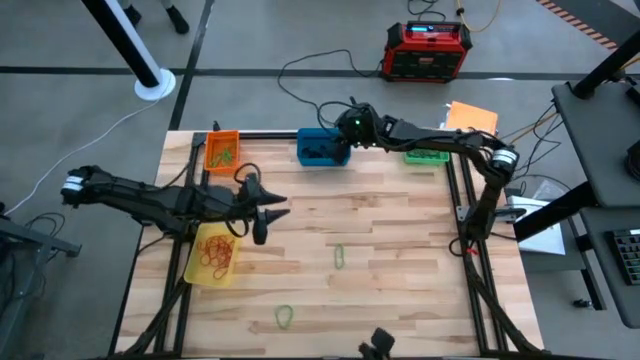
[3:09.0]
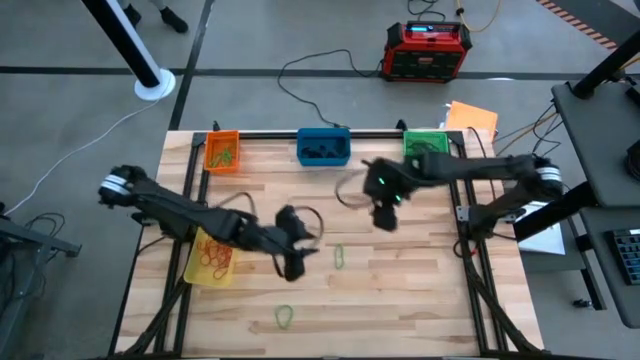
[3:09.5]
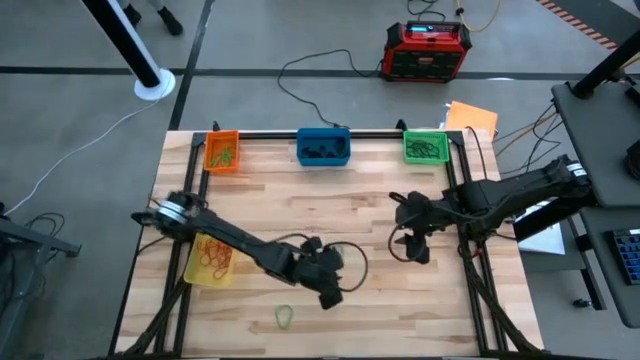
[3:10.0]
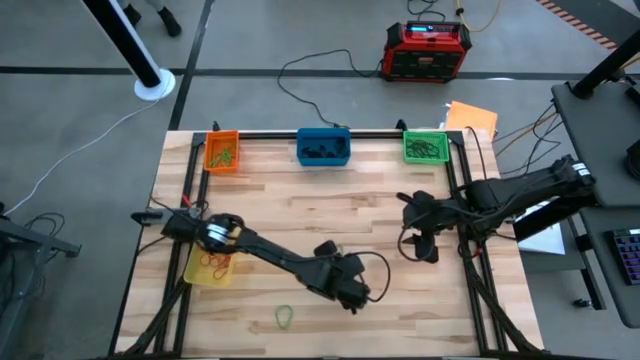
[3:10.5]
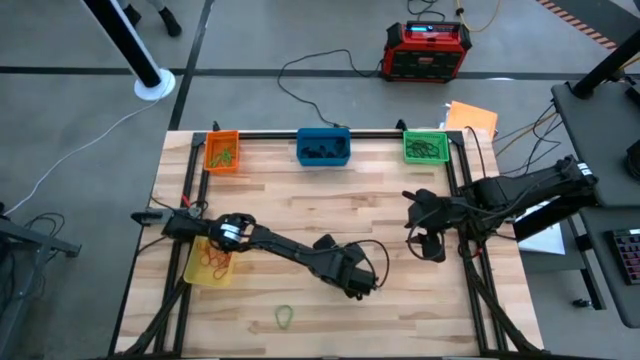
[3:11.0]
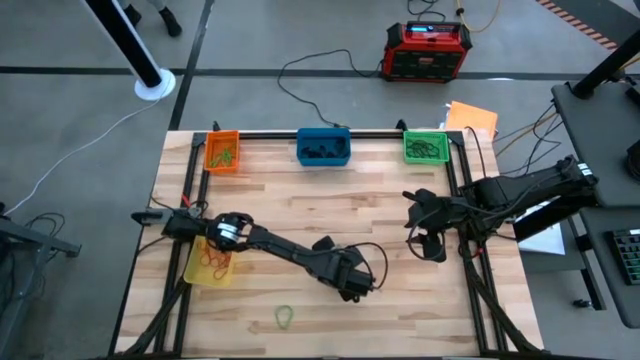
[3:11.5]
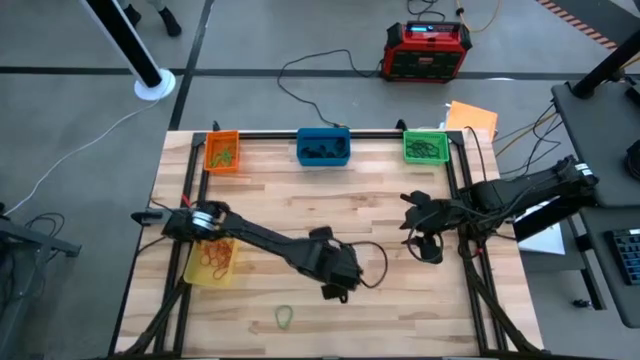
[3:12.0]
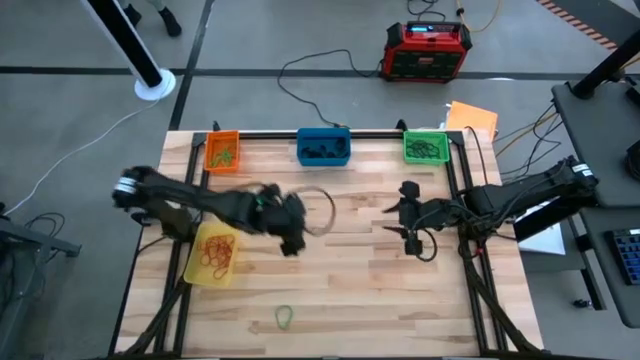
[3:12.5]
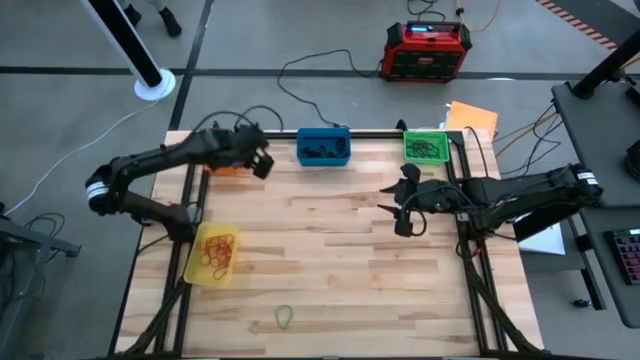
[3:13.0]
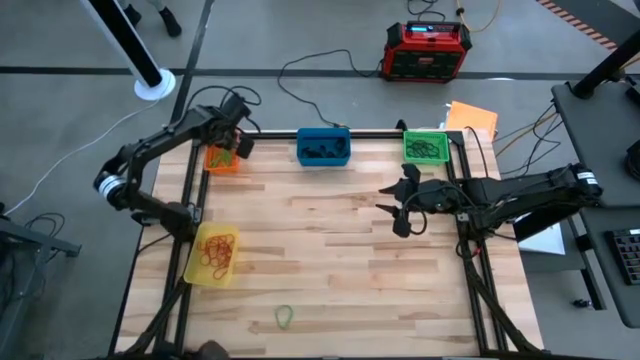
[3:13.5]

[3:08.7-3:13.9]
Task: Sort rubber bands into baskets
Put the right green rubber band into the orange bin

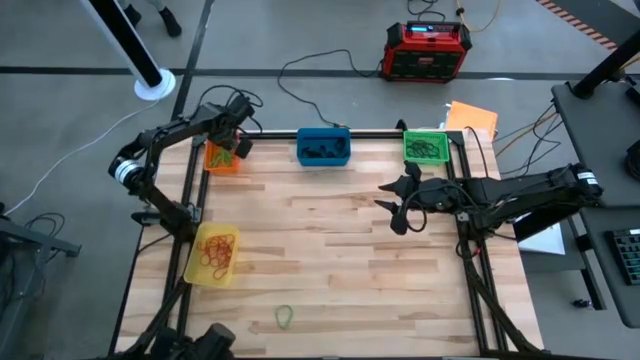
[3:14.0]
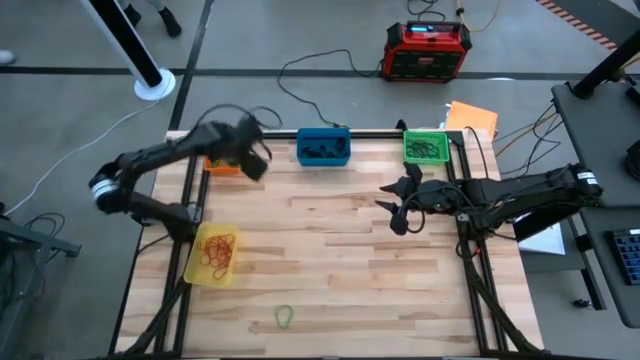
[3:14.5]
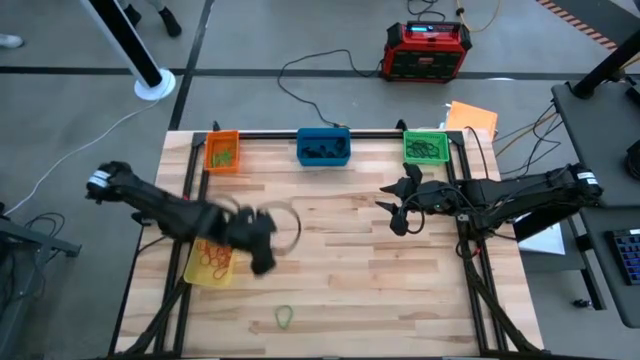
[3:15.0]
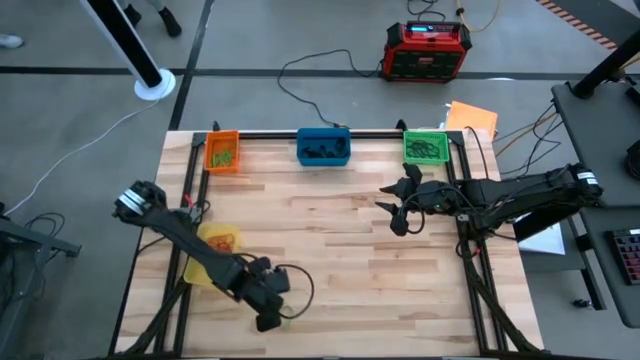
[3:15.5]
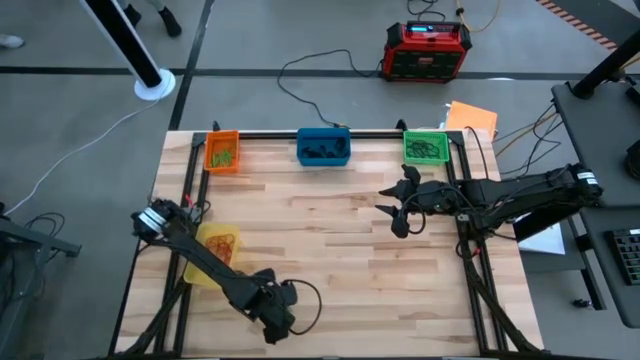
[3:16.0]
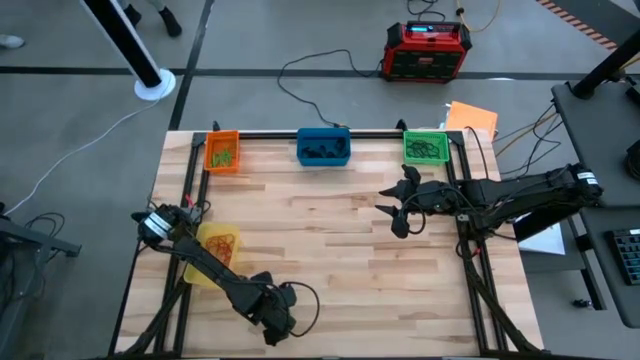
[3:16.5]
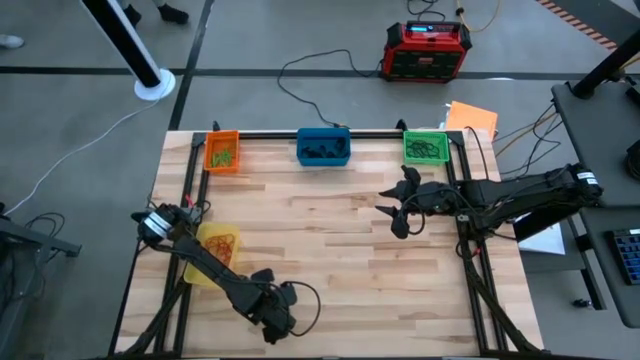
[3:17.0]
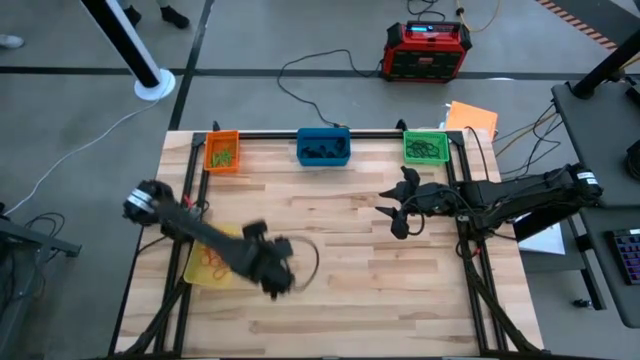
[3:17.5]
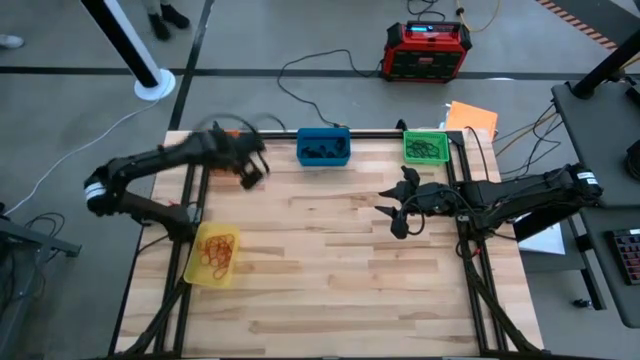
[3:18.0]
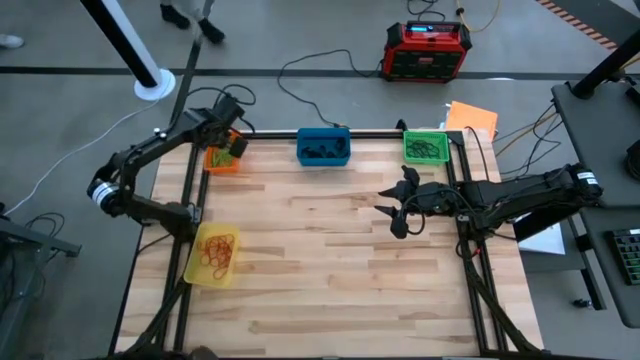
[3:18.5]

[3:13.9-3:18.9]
Put the green rubber band into the orange bin

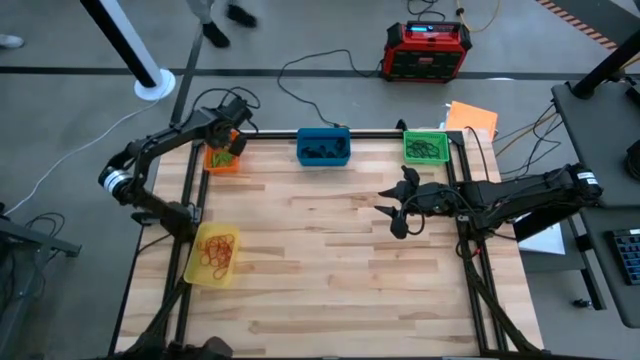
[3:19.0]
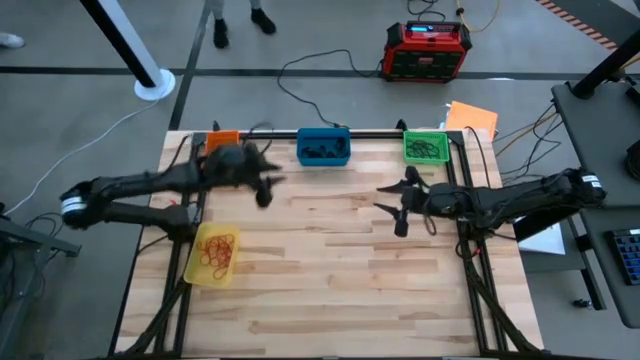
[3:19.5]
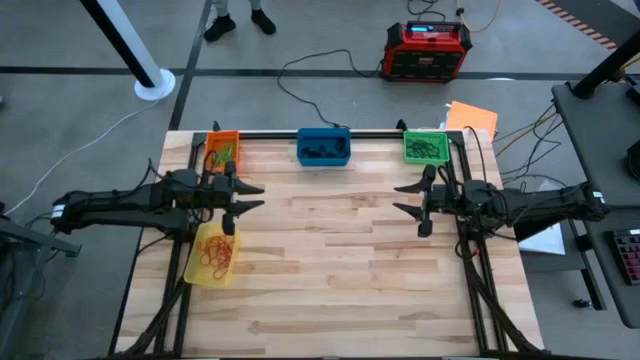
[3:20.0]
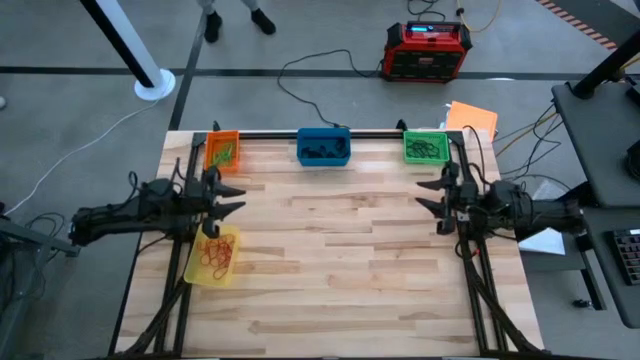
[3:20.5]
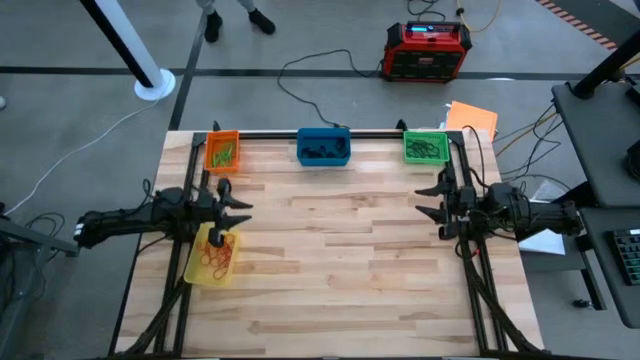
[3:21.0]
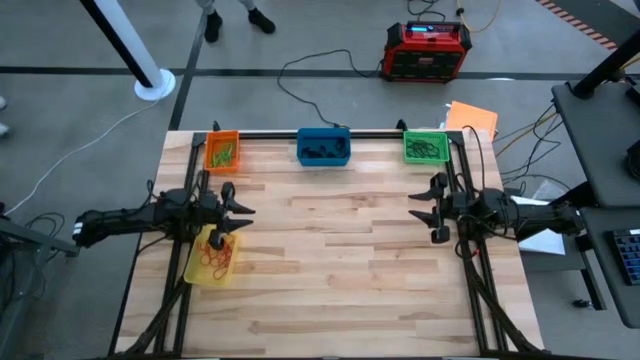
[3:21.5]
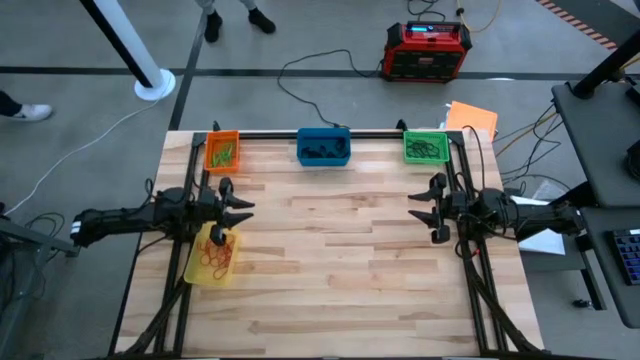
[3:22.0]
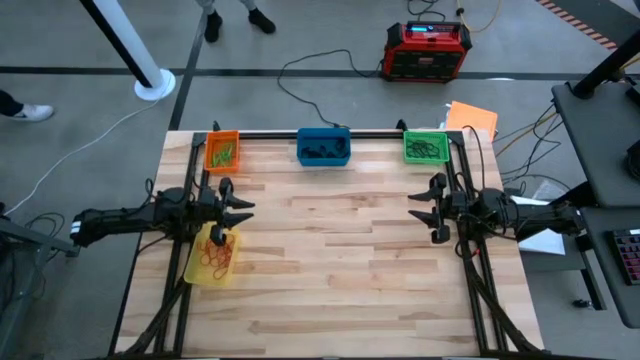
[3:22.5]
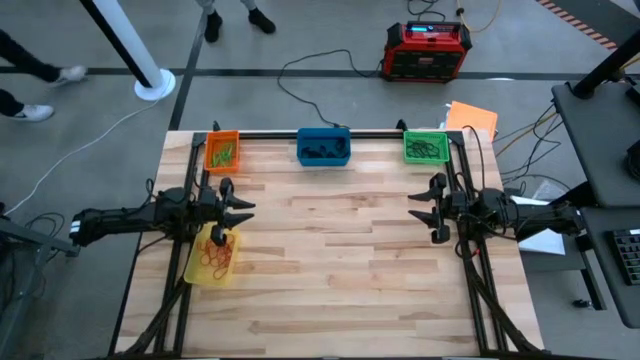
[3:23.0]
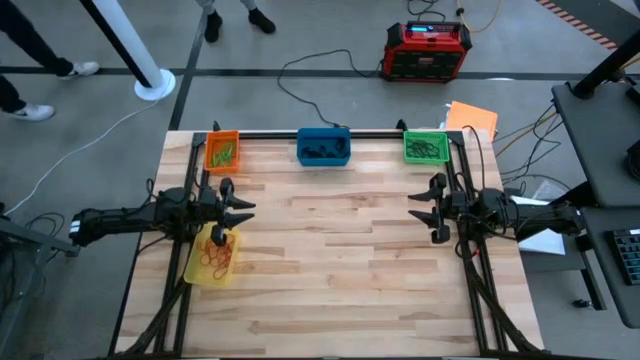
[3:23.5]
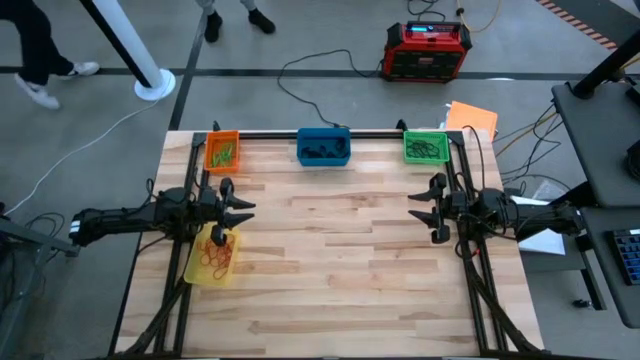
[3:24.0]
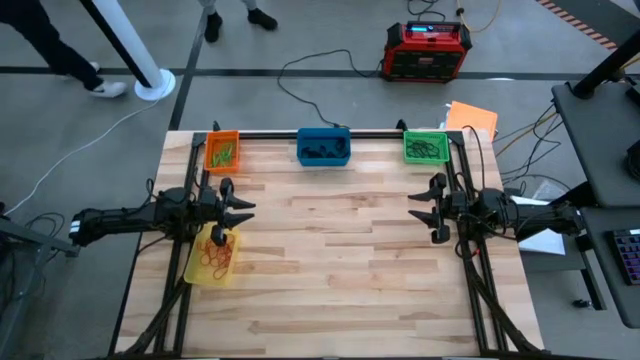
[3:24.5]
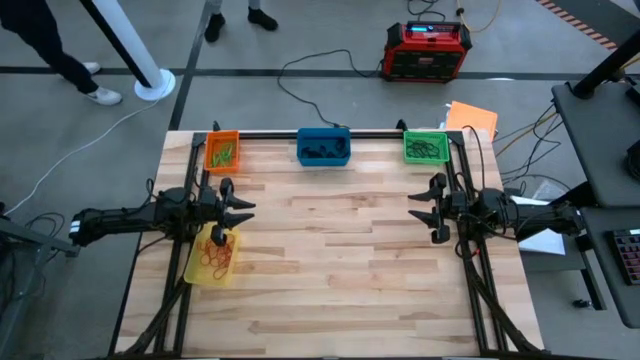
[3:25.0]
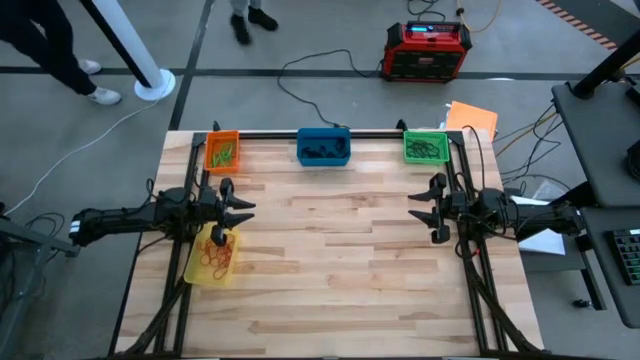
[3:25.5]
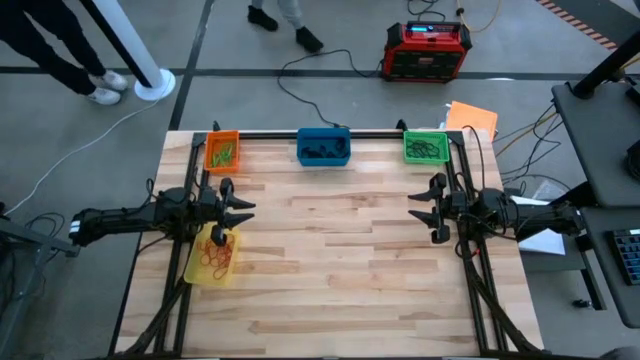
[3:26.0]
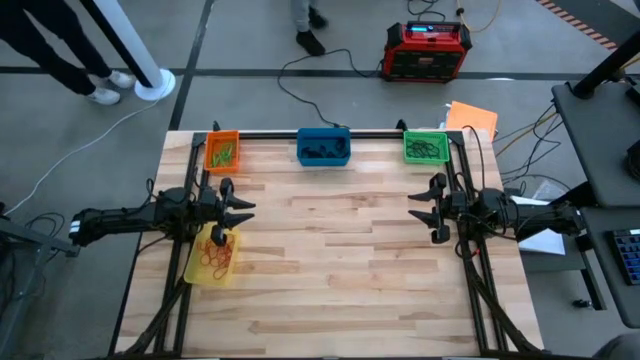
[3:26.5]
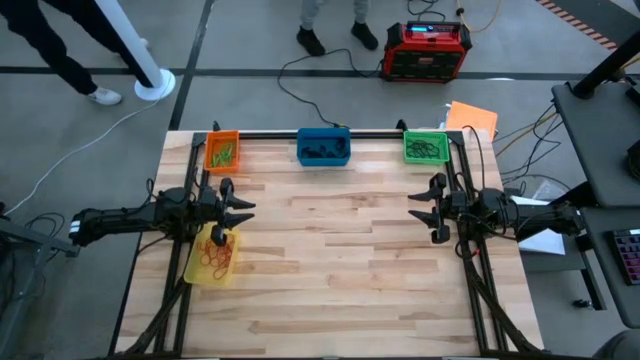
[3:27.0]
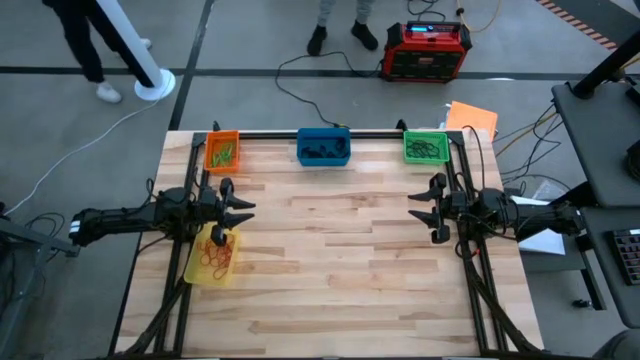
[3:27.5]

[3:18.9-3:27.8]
Return to Home Position
